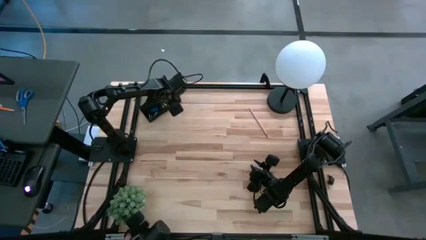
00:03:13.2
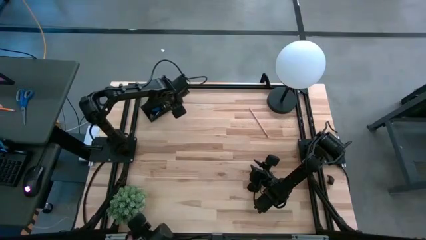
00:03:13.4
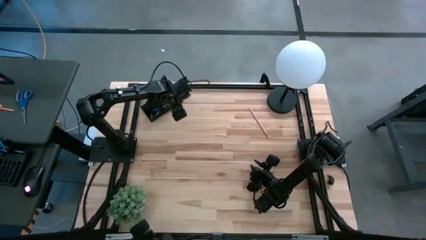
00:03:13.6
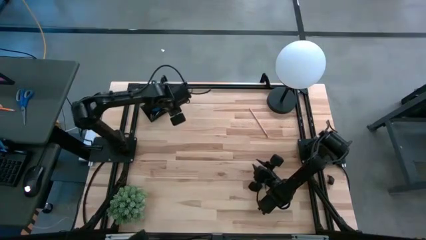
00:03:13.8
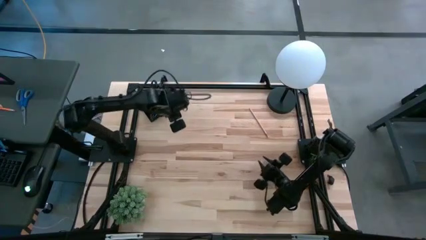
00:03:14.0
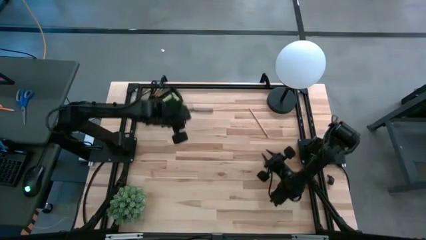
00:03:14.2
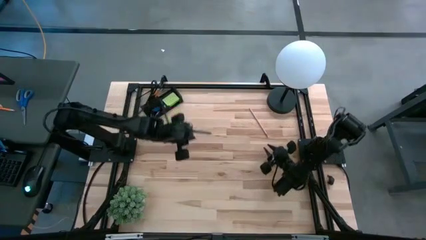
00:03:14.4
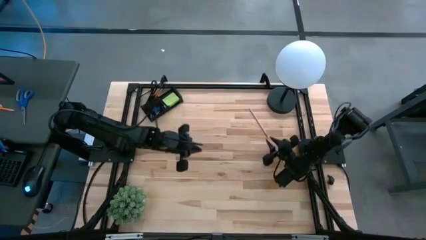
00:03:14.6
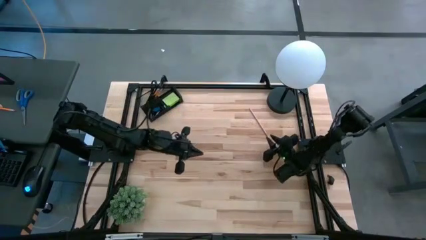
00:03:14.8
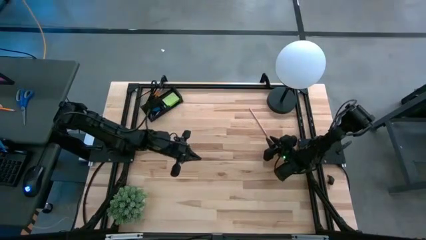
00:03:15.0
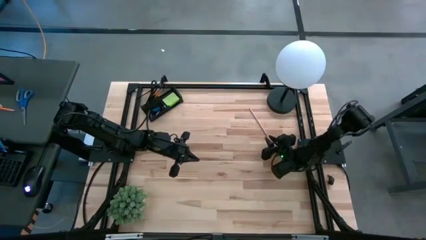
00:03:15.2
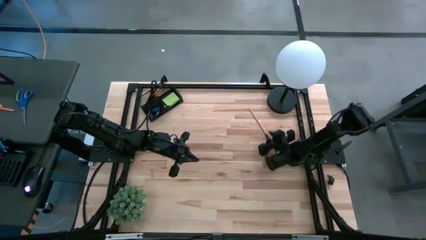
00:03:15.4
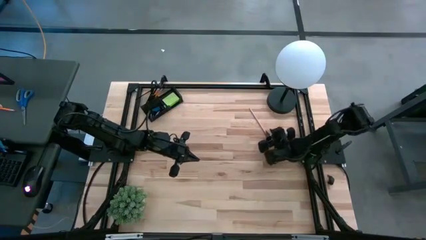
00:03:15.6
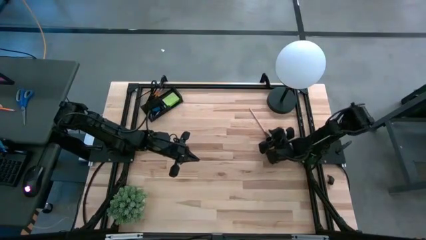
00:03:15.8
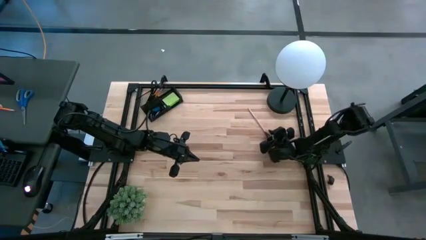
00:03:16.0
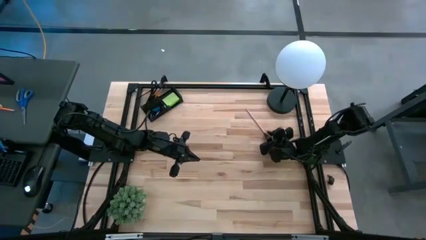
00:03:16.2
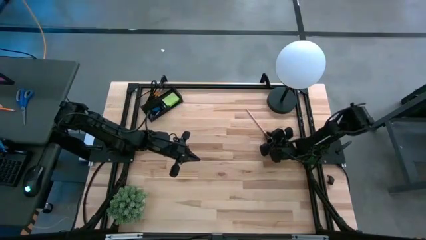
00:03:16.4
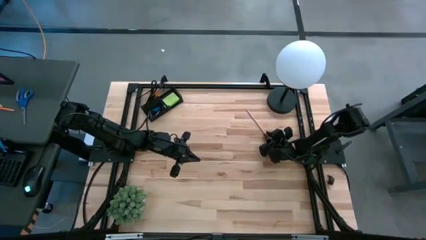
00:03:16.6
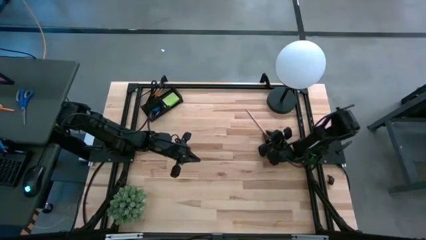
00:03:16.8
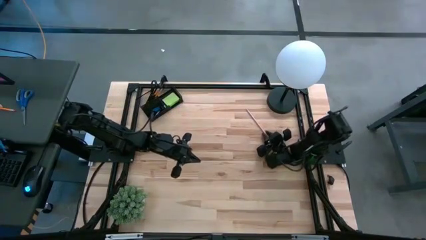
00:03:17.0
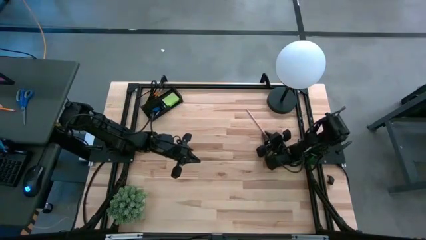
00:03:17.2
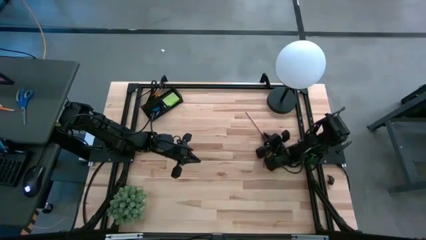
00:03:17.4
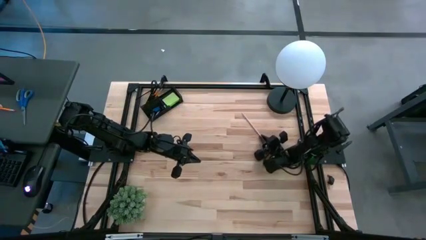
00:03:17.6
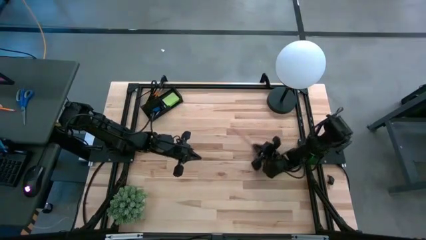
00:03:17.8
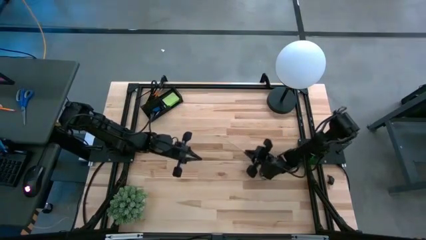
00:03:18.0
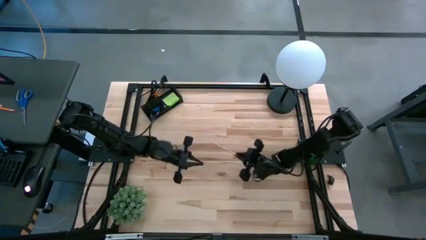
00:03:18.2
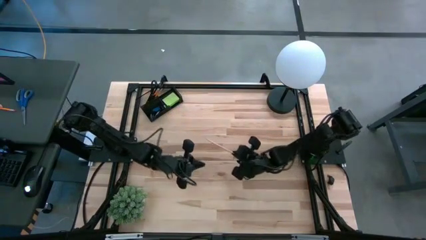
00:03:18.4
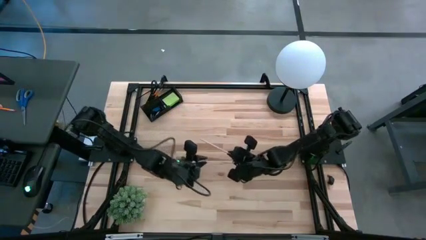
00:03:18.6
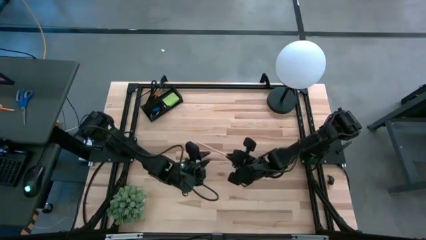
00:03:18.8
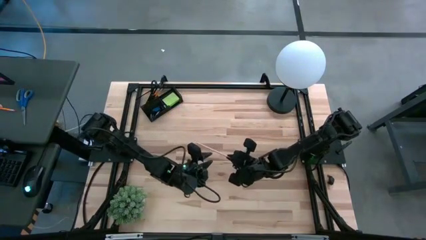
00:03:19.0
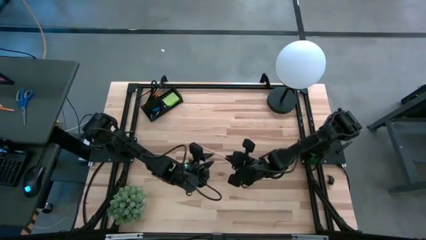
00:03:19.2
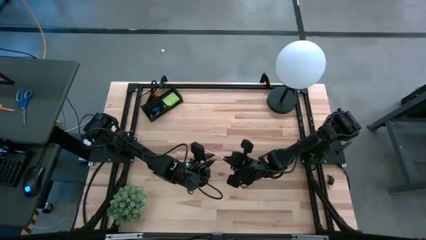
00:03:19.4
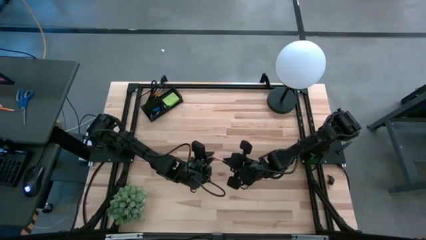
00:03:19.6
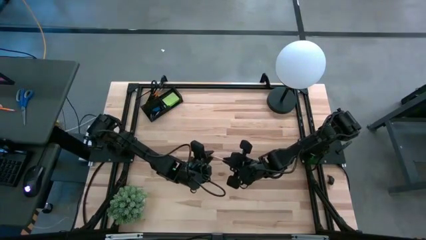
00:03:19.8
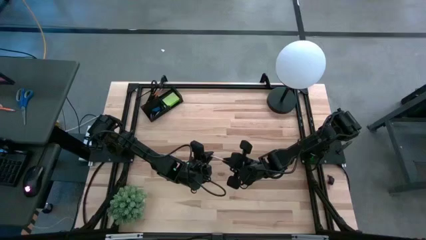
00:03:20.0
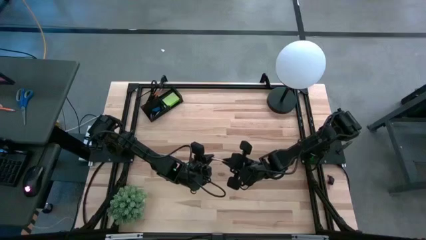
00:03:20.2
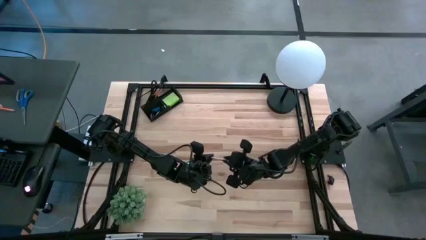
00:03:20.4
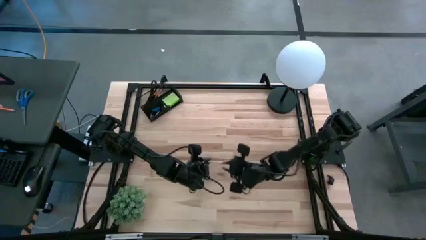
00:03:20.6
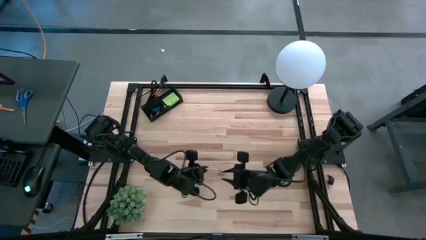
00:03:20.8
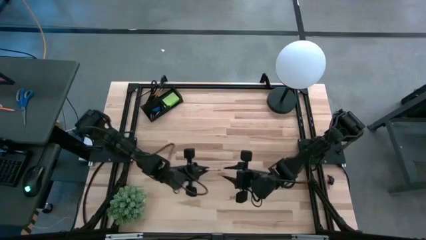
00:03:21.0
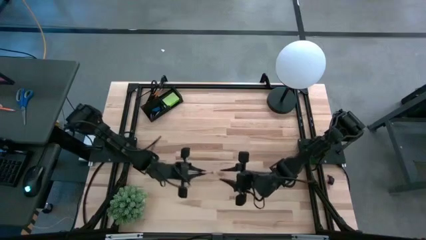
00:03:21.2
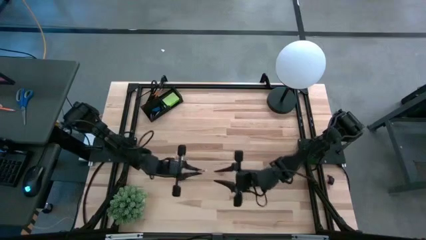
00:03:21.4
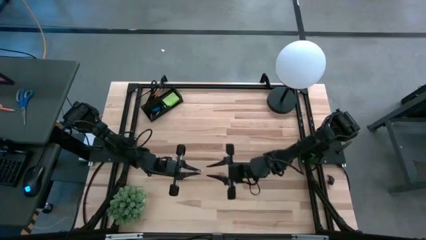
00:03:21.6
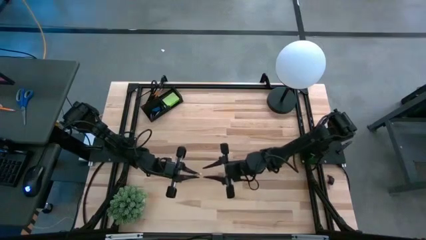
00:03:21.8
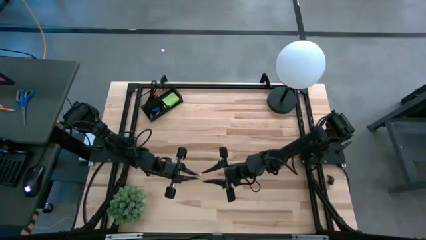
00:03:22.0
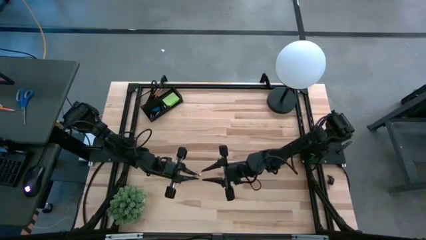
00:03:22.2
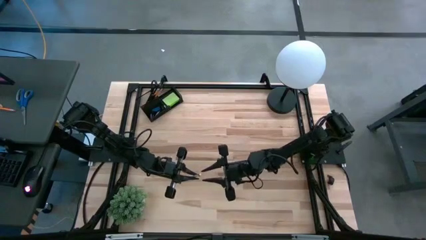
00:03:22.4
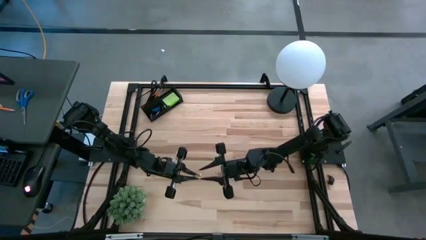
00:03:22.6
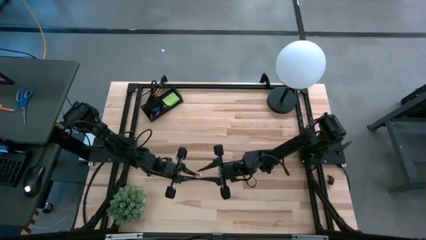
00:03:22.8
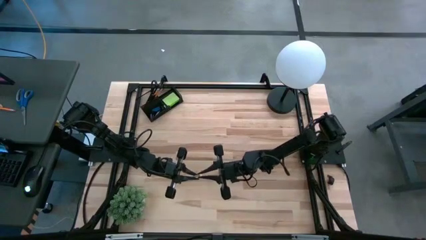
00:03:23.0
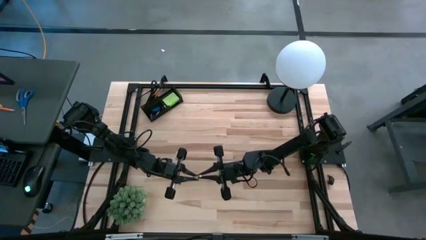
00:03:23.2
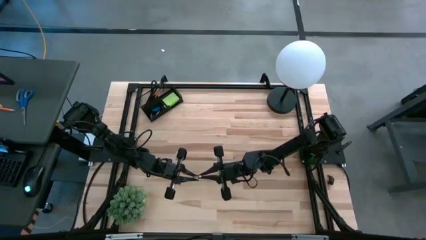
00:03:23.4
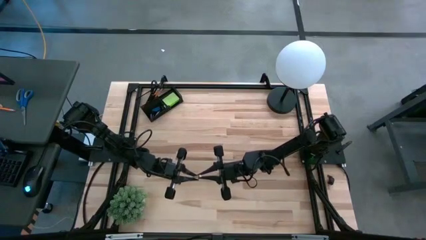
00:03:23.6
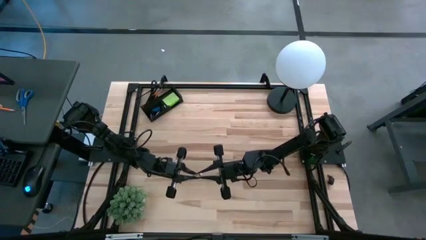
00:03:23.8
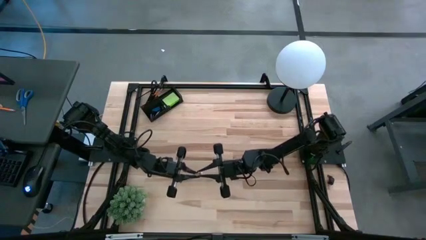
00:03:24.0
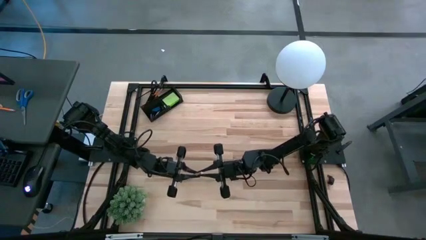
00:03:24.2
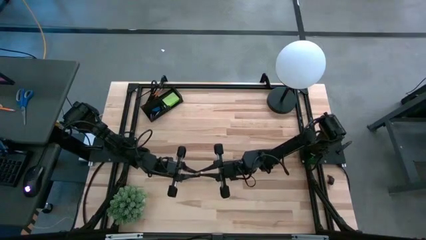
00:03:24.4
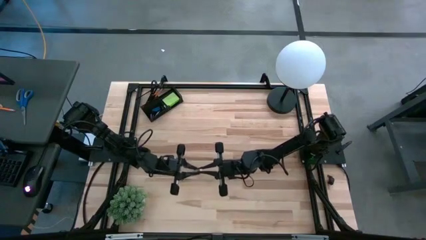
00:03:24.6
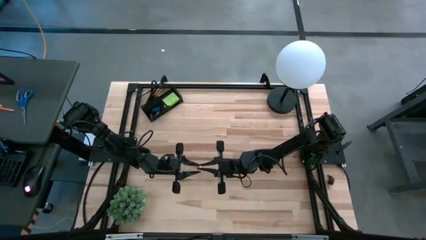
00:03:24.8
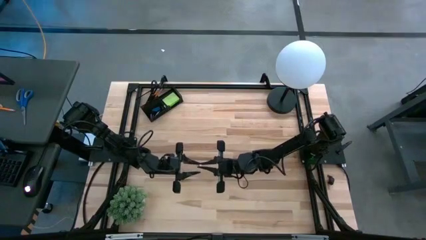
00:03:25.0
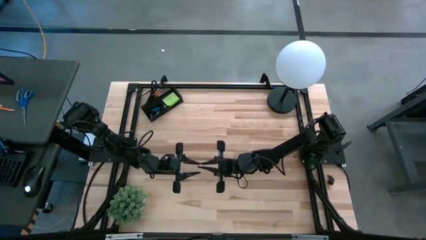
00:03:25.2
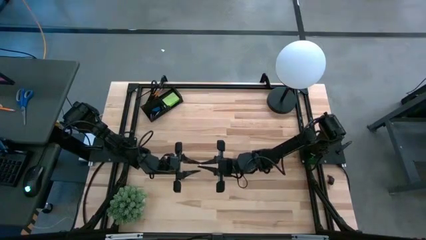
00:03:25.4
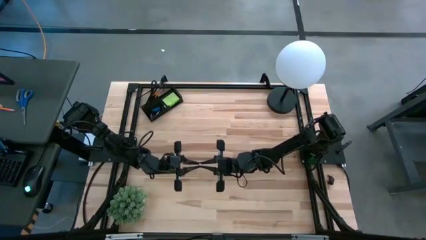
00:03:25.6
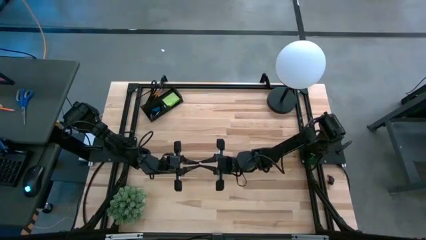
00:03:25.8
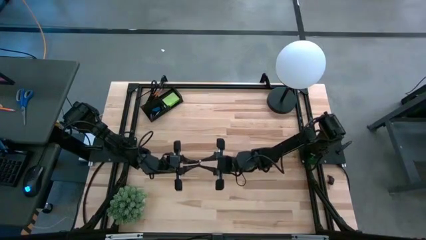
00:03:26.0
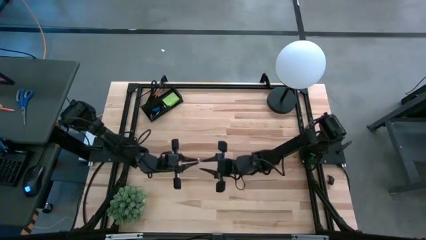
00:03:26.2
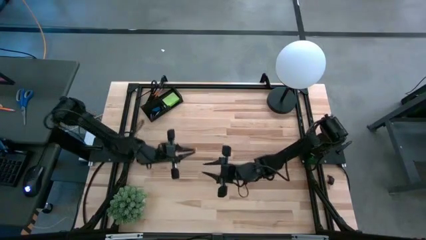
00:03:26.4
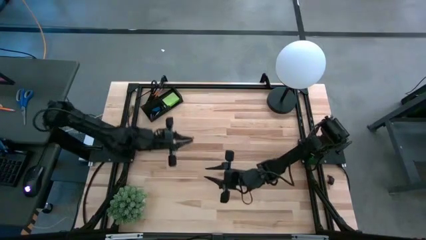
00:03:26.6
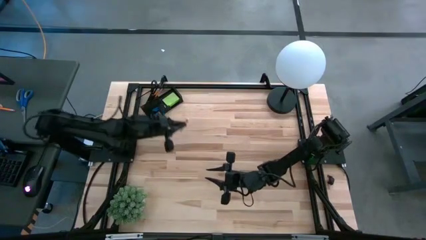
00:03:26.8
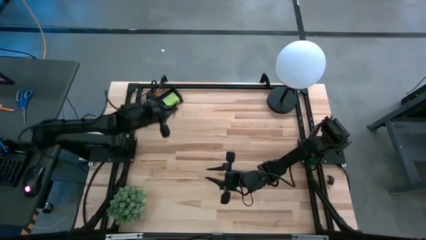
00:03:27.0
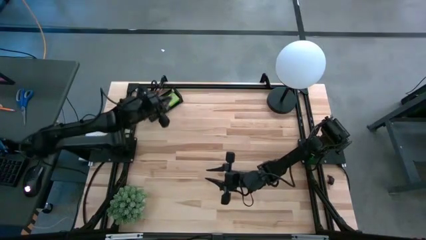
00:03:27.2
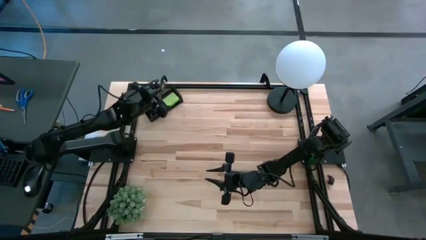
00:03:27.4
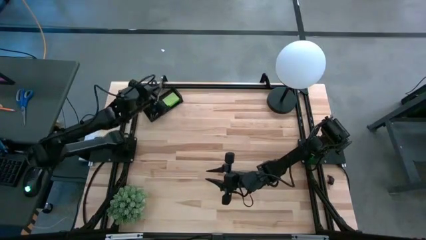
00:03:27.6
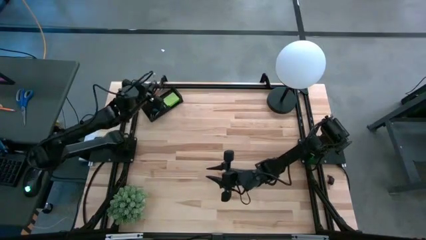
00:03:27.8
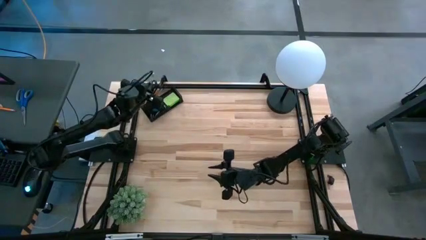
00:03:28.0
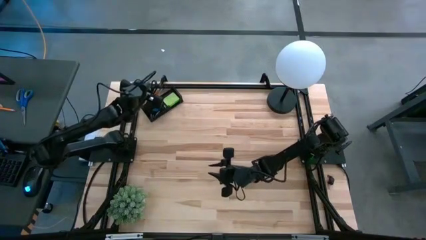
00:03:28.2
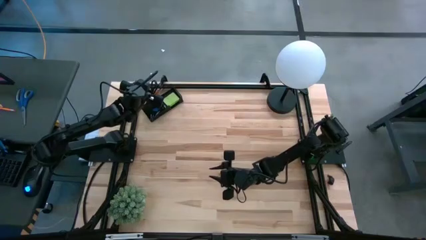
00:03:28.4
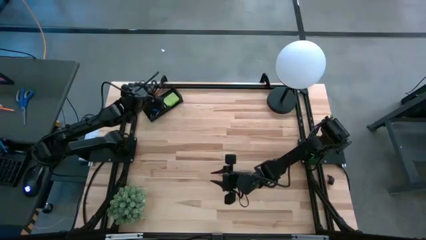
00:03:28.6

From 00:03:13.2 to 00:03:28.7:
Task: Pick and place office supplies into organizer
Put the pink pencil into the black desk organizer
